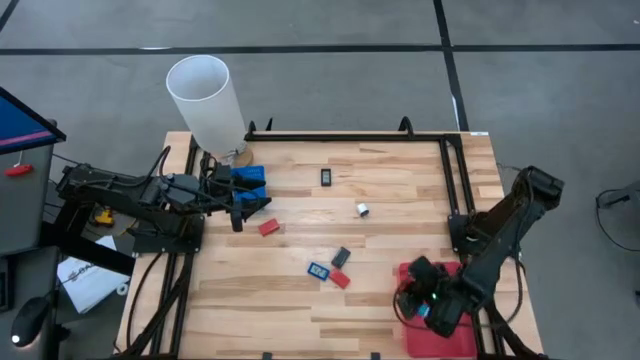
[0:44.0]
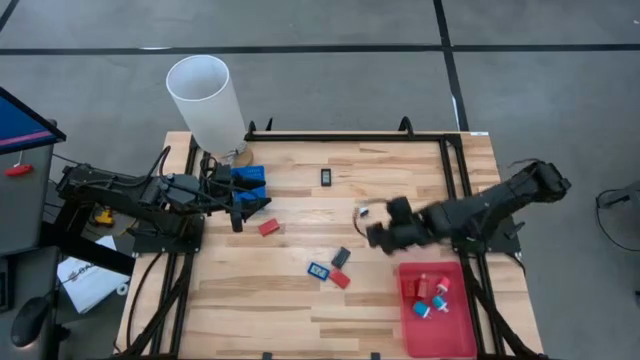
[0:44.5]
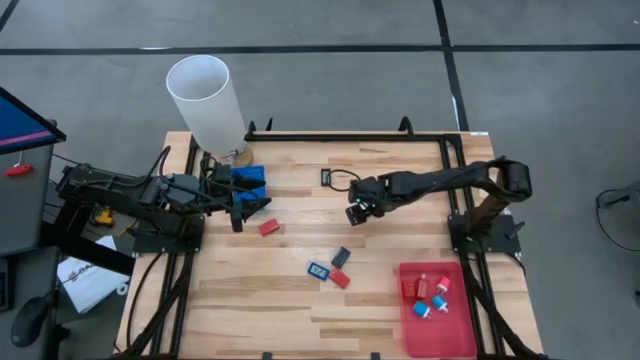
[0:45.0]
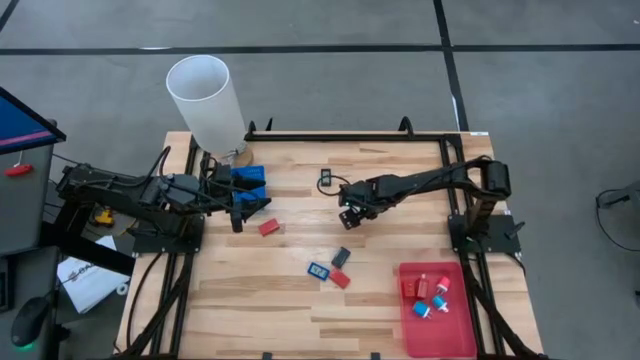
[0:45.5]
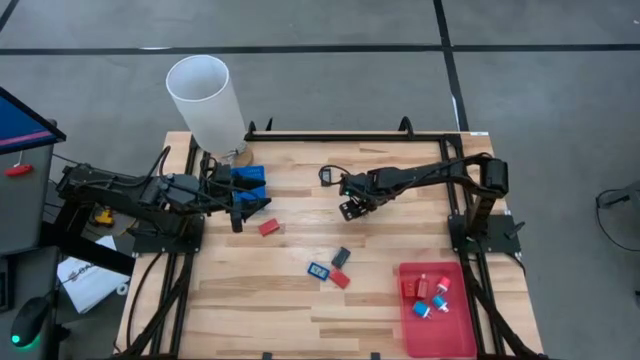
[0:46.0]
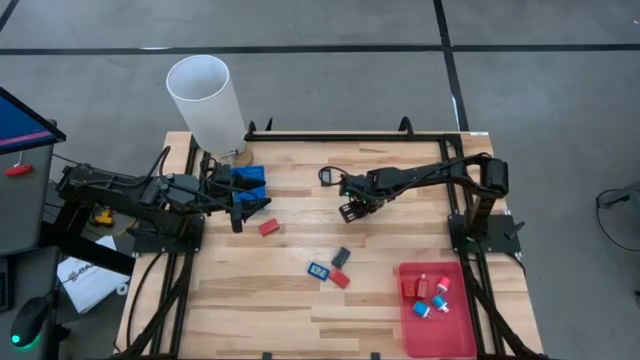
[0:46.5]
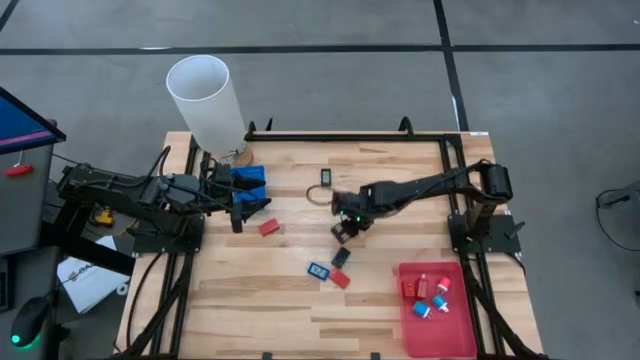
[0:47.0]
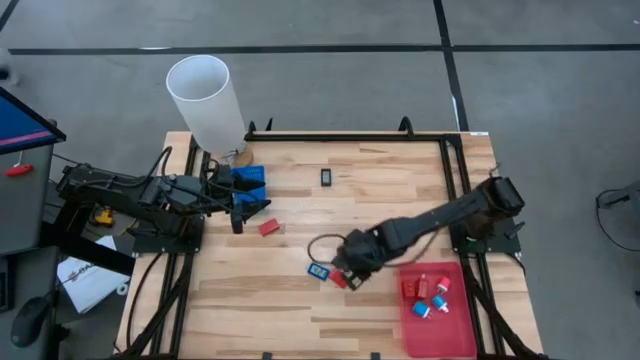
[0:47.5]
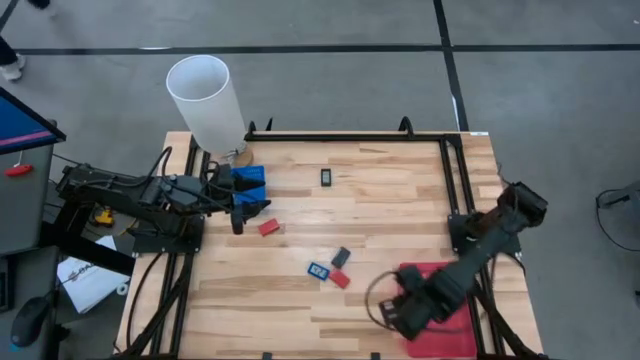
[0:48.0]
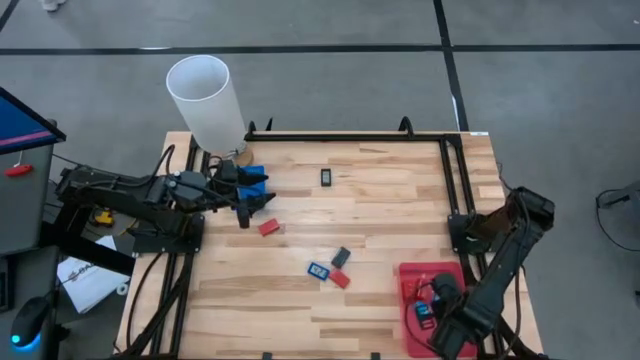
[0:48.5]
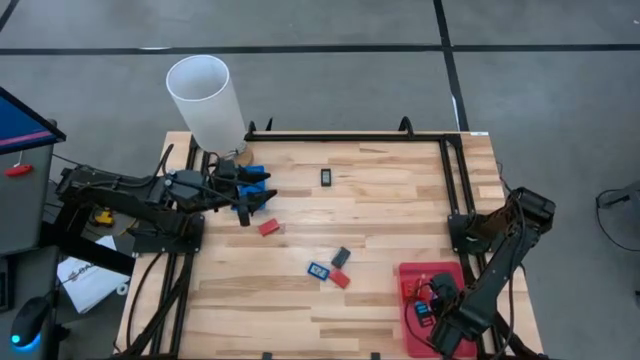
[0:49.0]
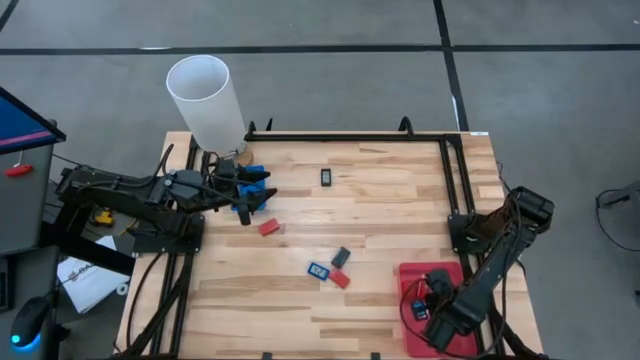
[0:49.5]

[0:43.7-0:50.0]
Task: Pick & Place Office items
Put the white charger adapter into the red bin

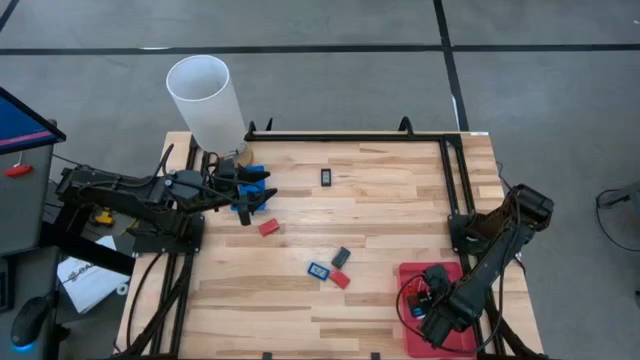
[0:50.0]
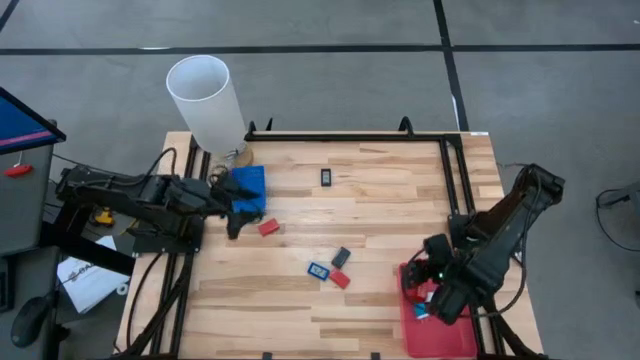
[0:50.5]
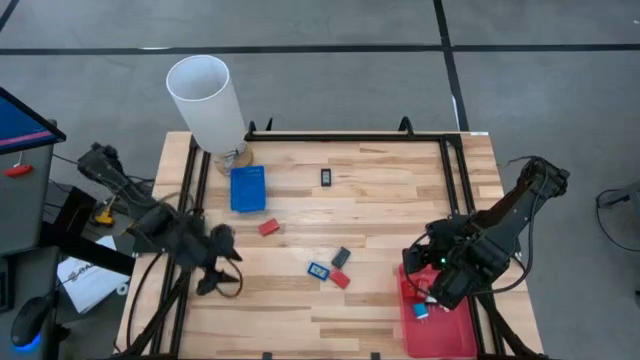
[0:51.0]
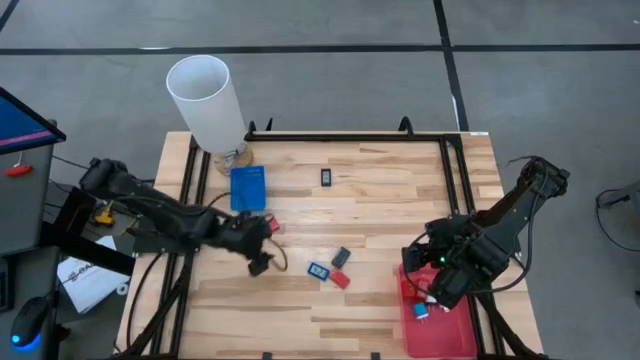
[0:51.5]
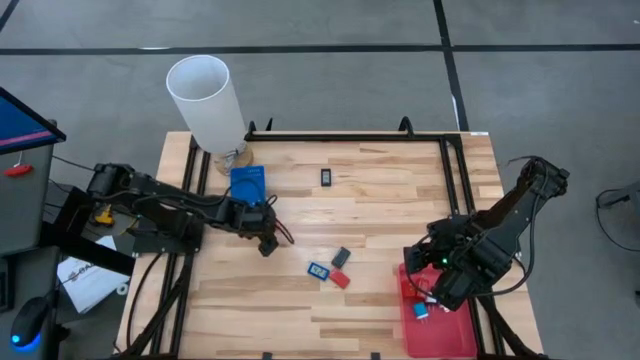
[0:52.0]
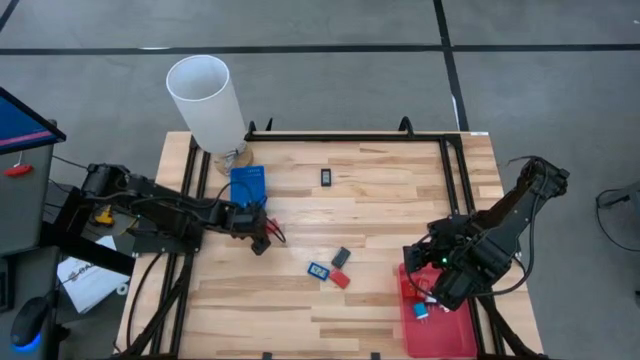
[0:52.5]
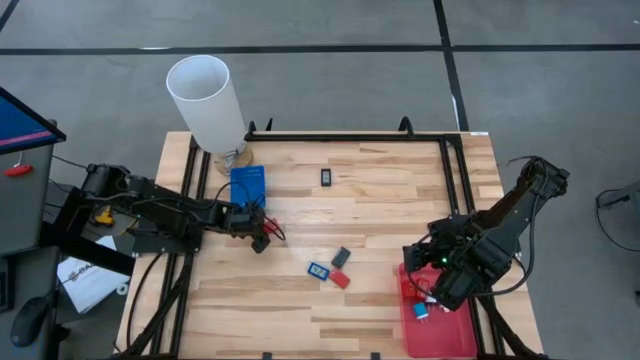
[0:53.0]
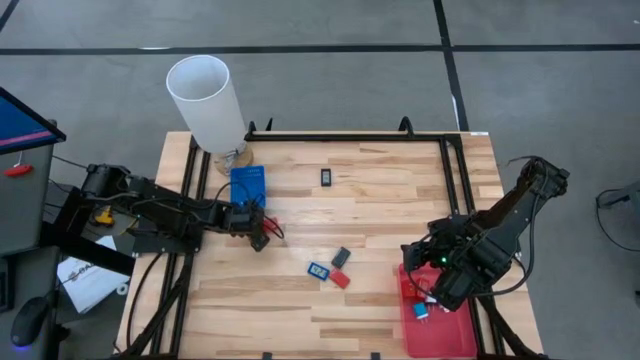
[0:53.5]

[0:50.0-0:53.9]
Put the top red digital timer into the blue bin

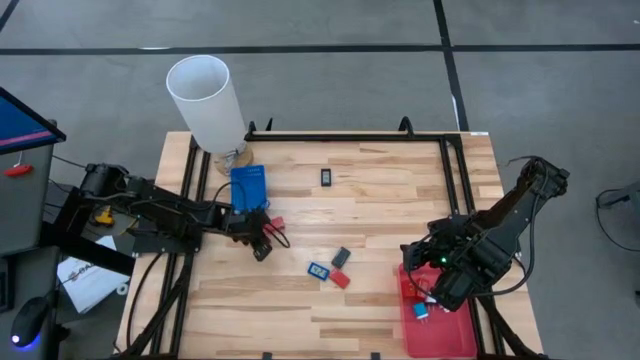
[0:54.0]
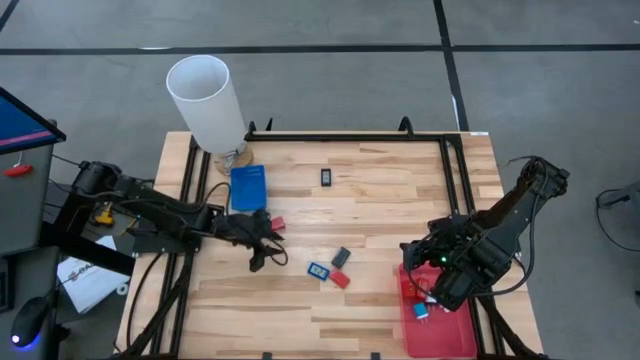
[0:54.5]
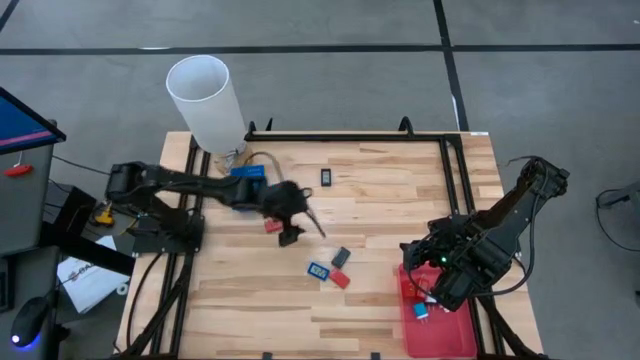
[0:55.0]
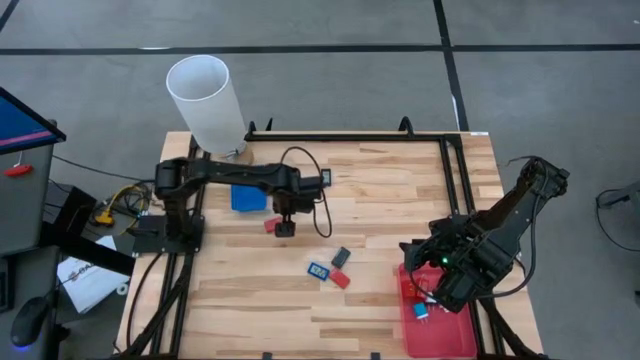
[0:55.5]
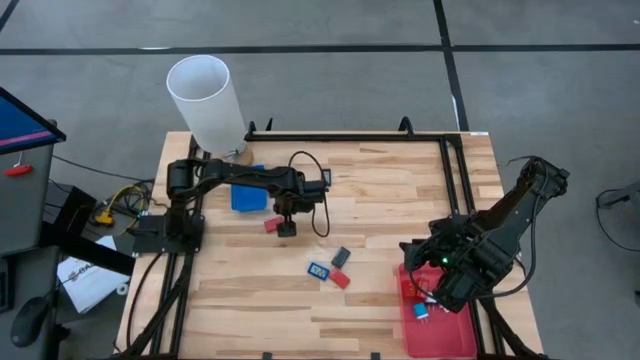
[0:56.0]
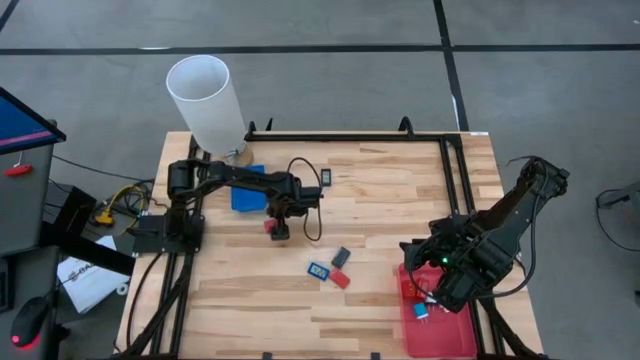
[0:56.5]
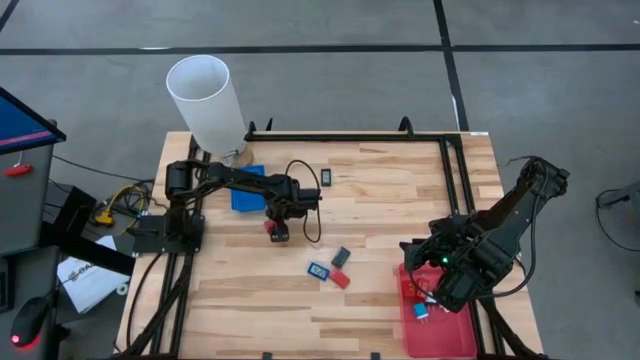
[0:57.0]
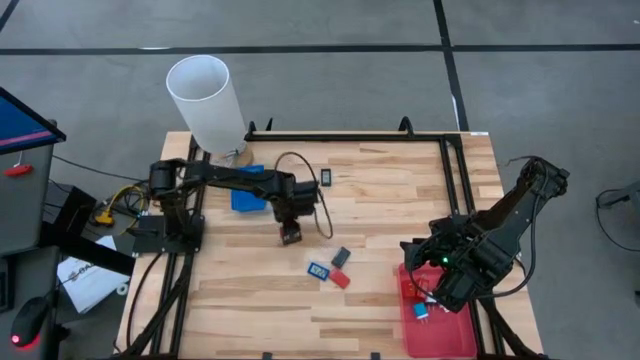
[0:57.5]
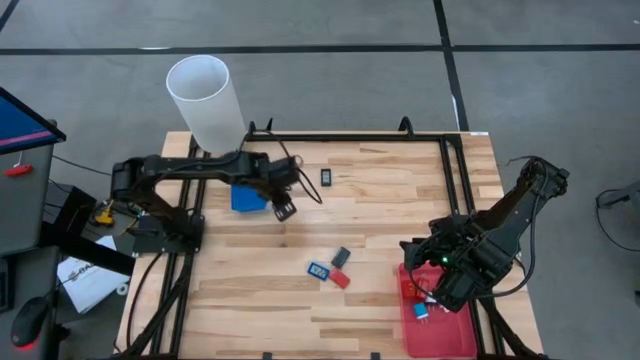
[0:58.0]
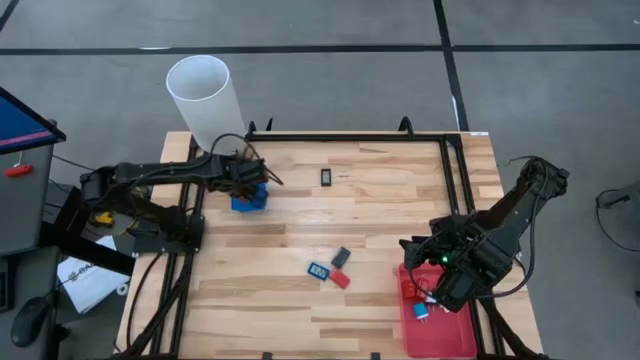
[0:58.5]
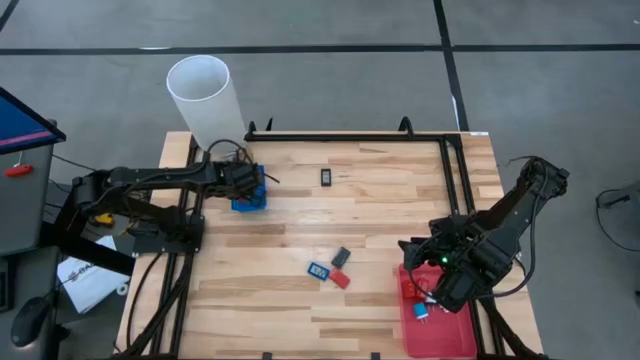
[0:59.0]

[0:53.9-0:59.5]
Put the top red digital timer into the blue bin

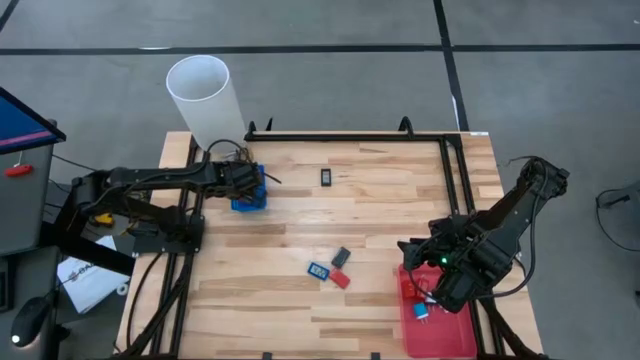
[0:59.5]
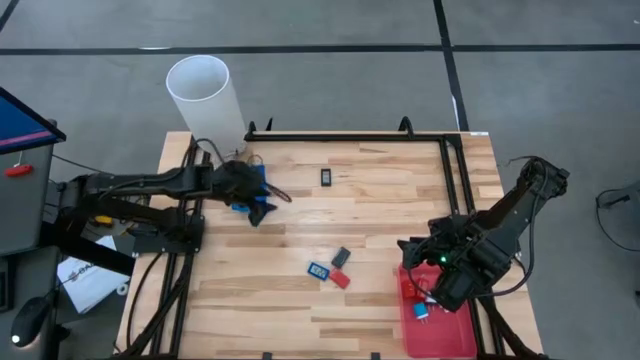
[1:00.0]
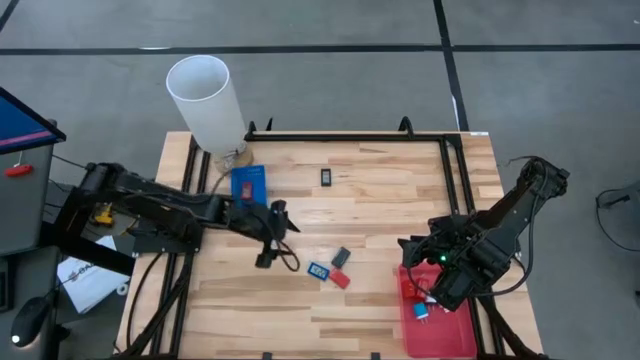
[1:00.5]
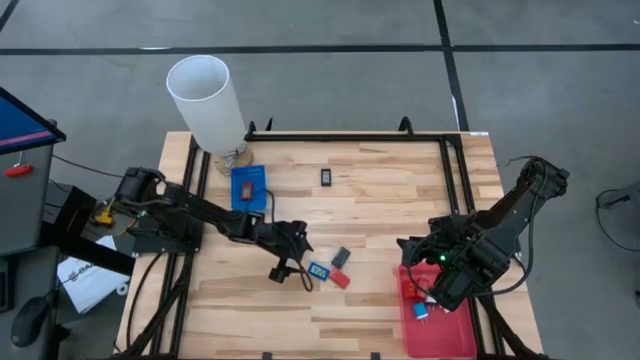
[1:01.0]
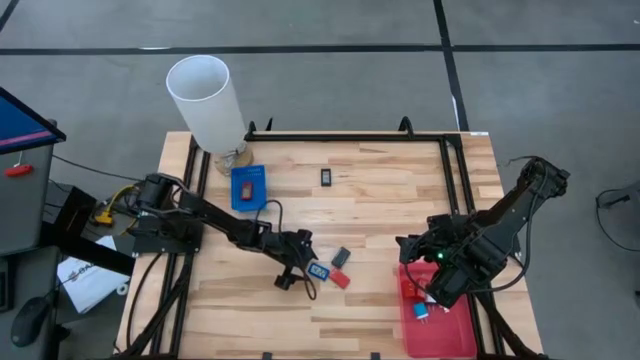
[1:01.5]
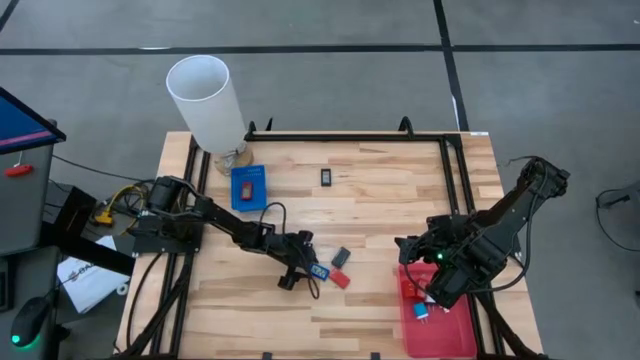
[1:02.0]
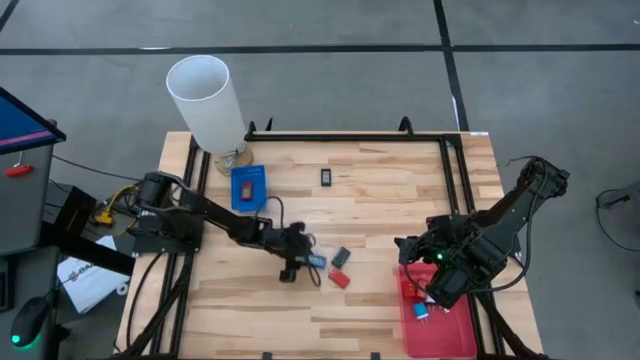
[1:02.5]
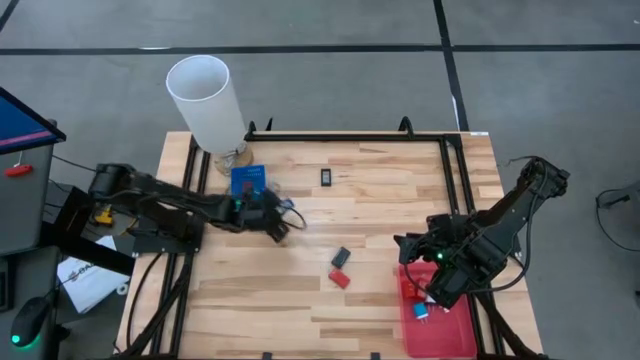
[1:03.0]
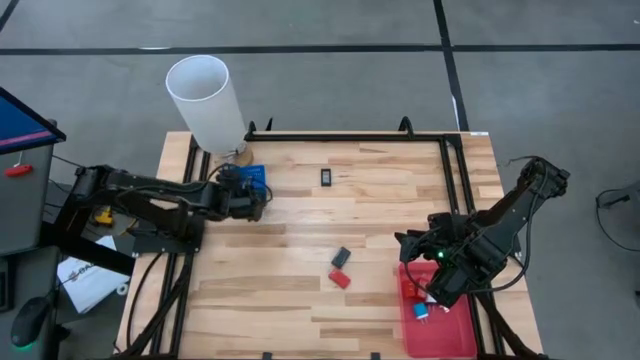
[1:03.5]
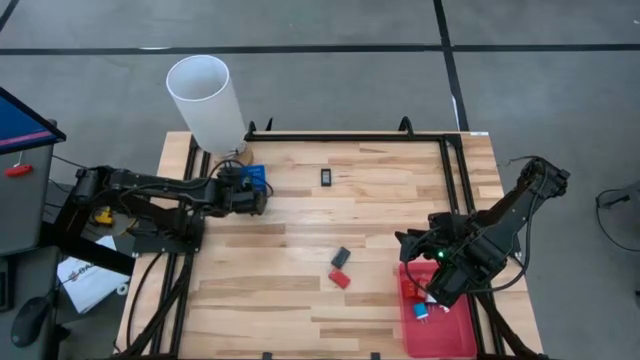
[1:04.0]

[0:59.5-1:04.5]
Put the blue digital timer into the blue bin

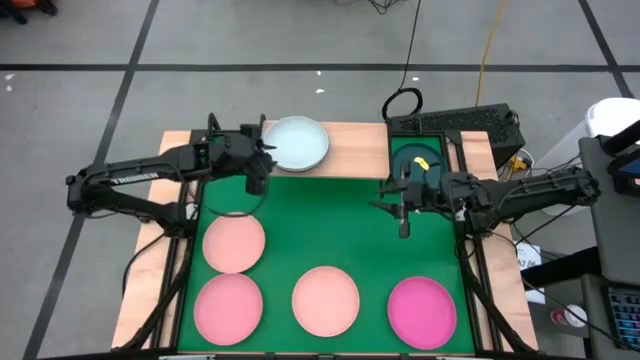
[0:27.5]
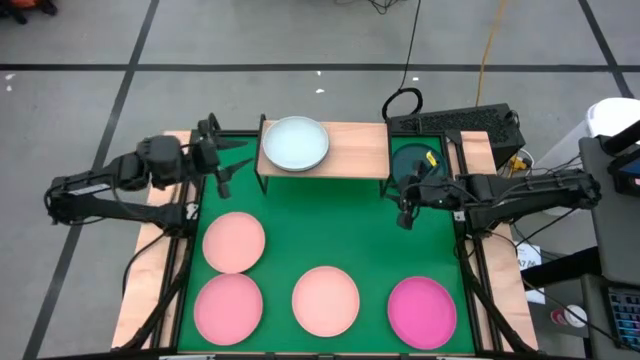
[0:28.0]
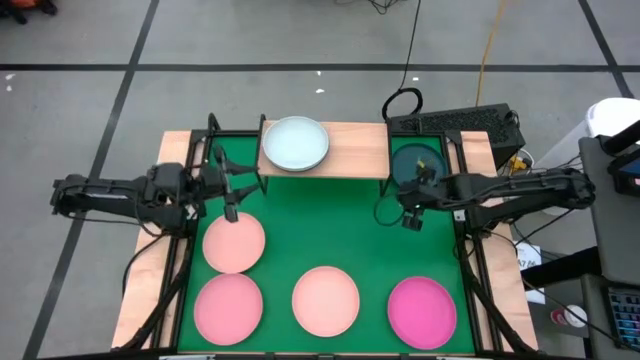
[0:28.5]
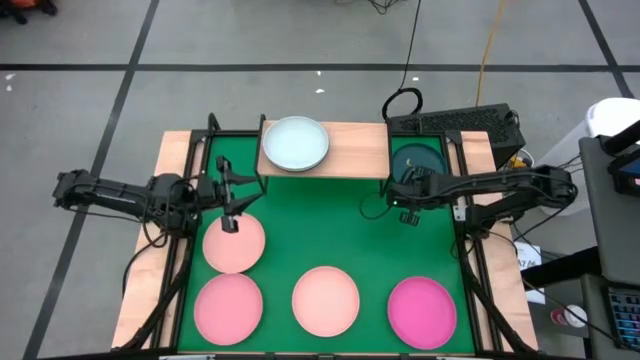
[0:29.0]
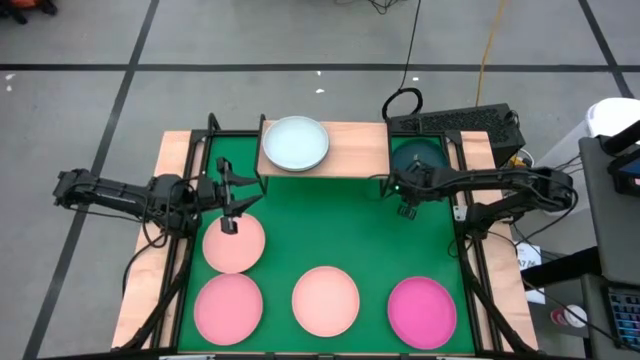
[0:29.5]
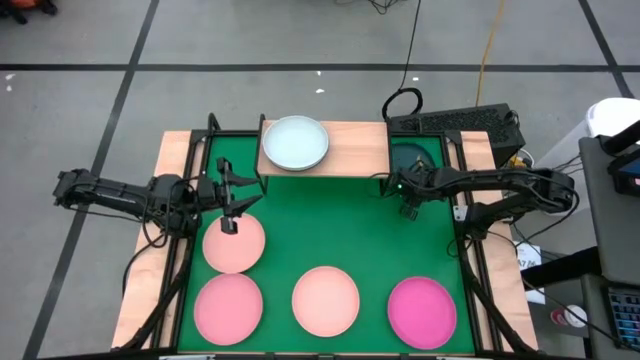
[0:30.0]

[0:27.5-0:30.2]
Task: Place and stack plates onto a shelf
Stack the black plate on top of the white plate on the shelf
